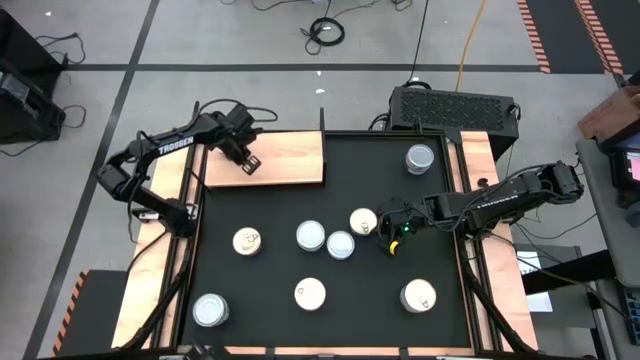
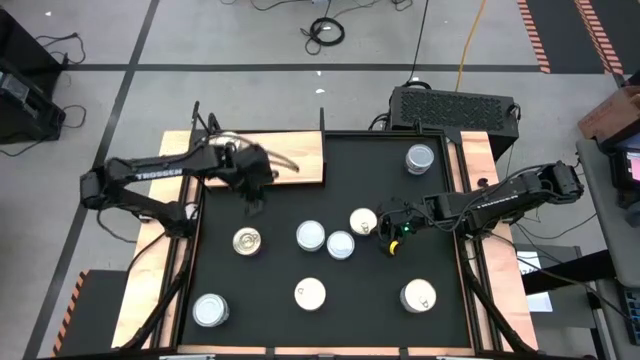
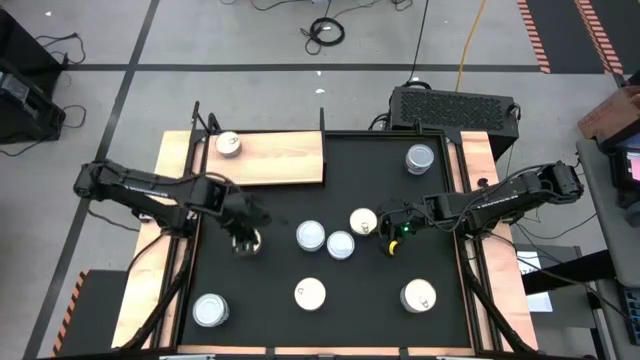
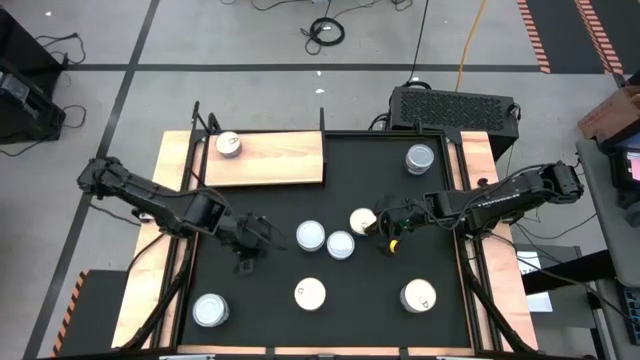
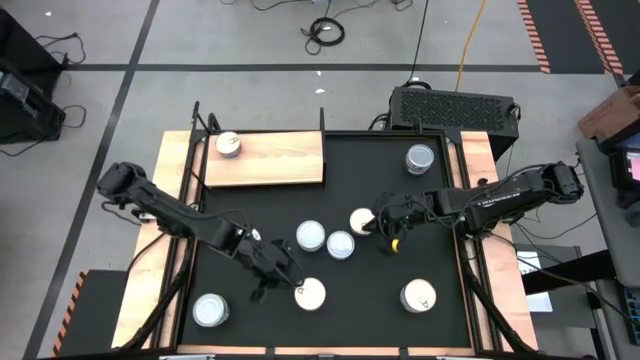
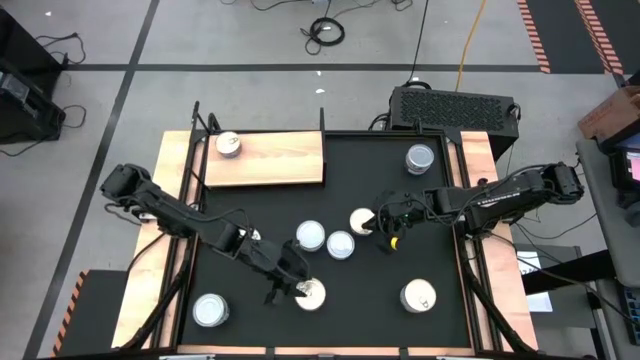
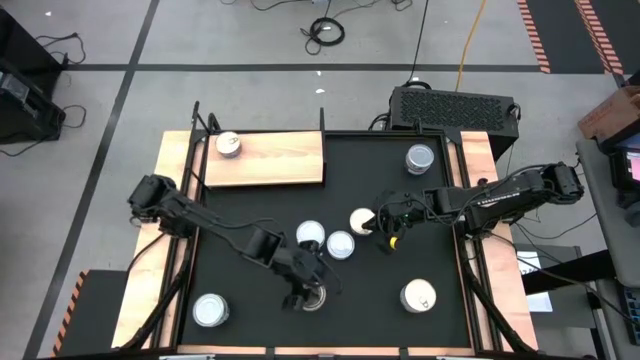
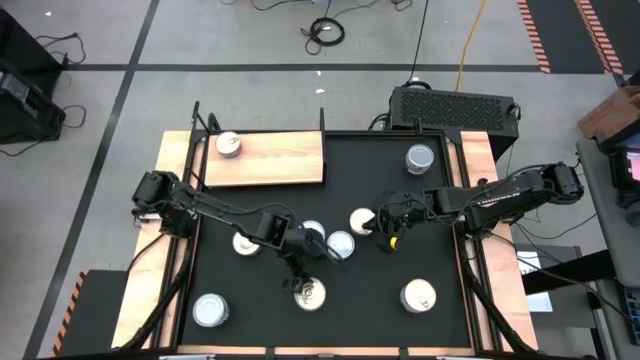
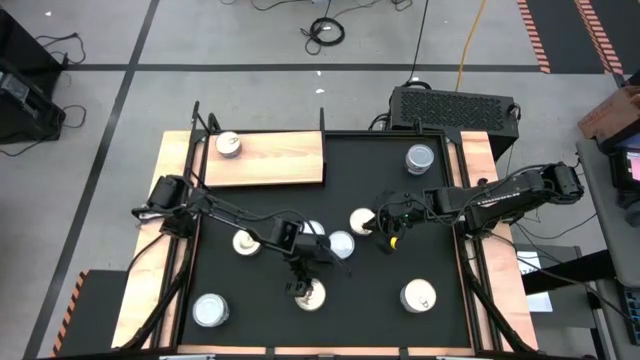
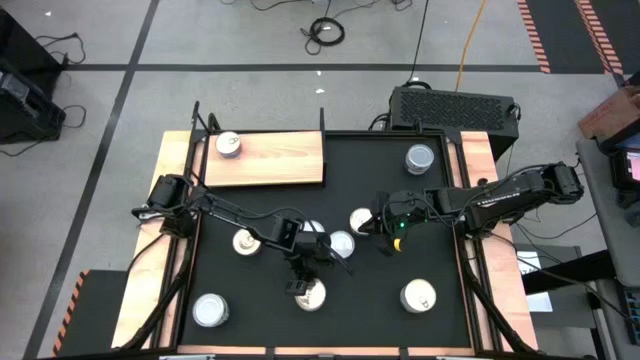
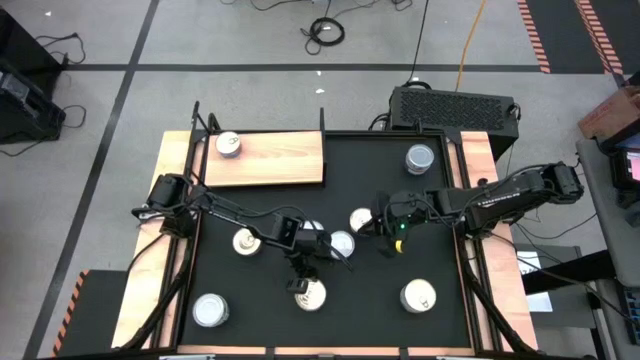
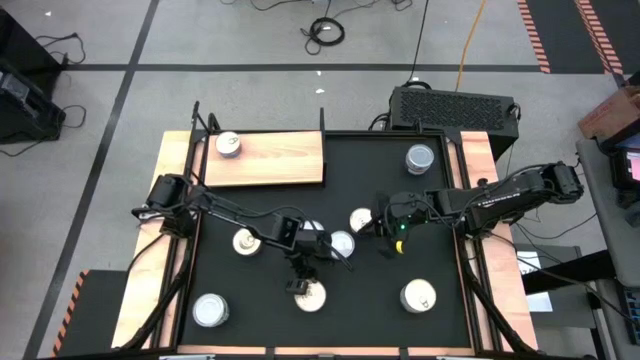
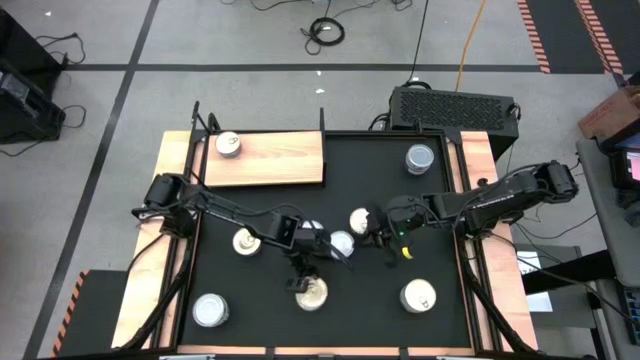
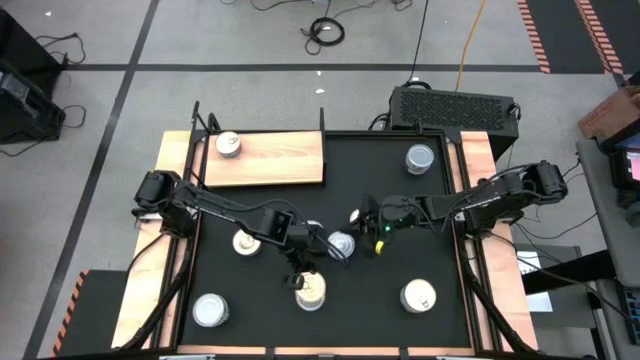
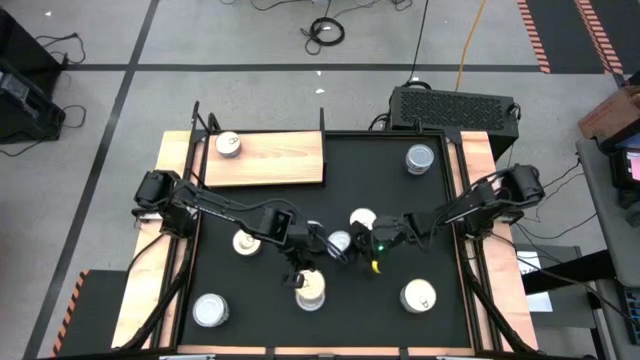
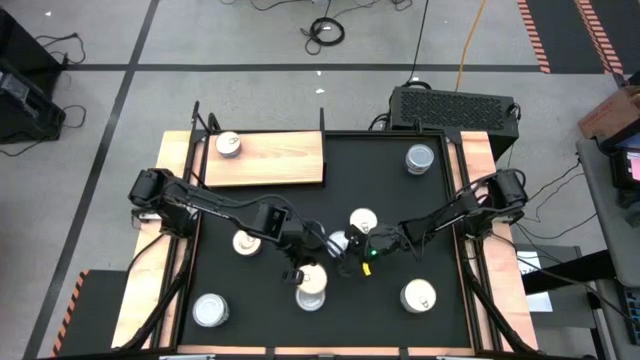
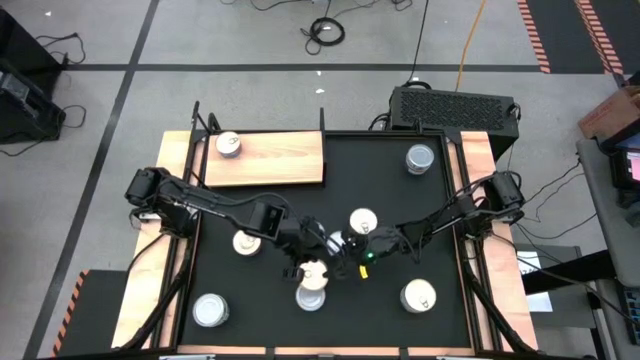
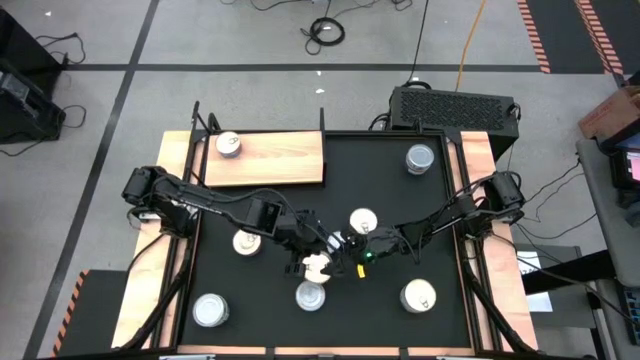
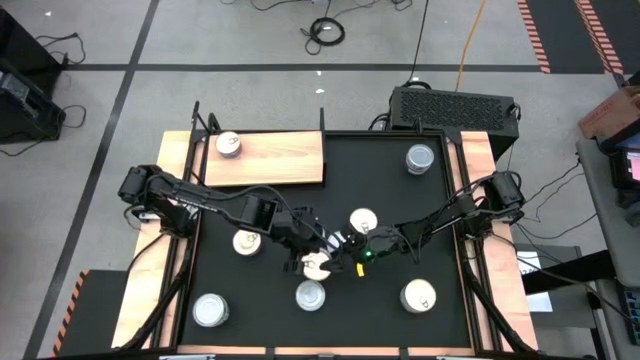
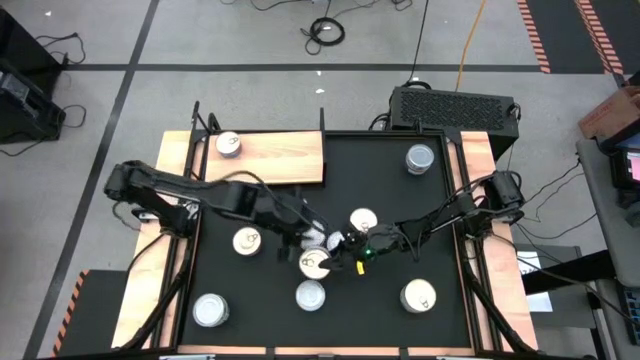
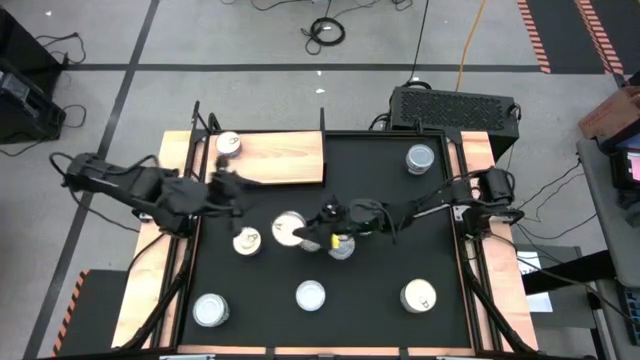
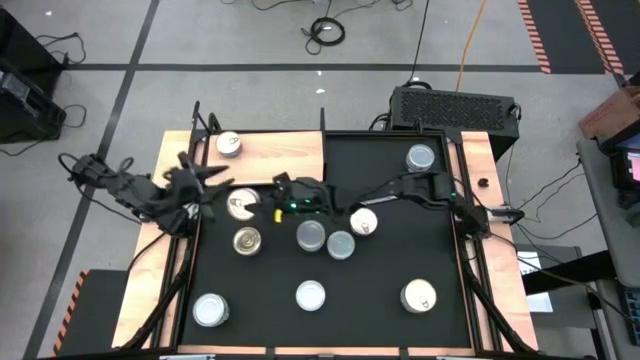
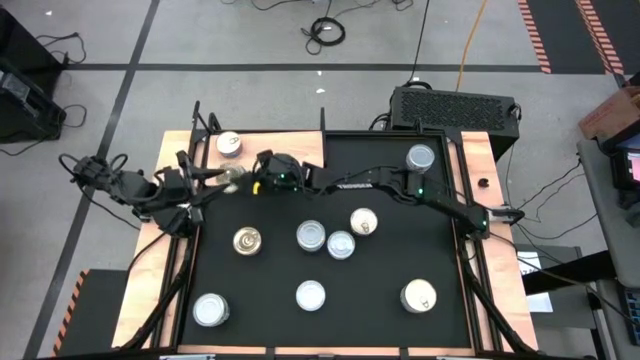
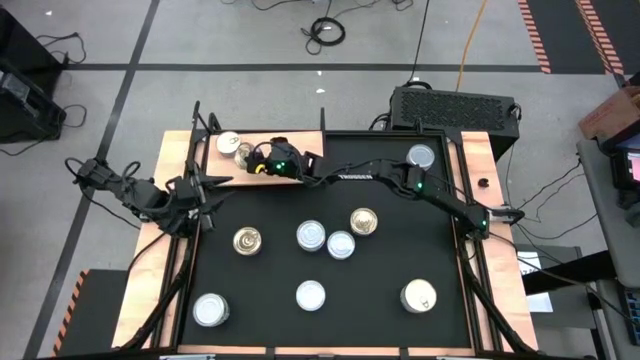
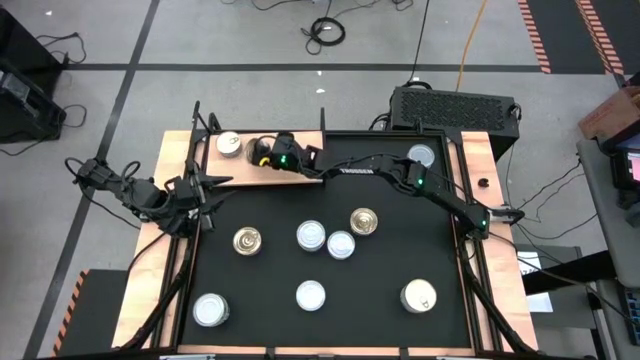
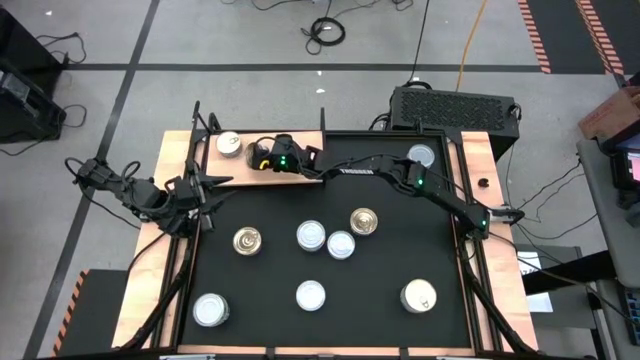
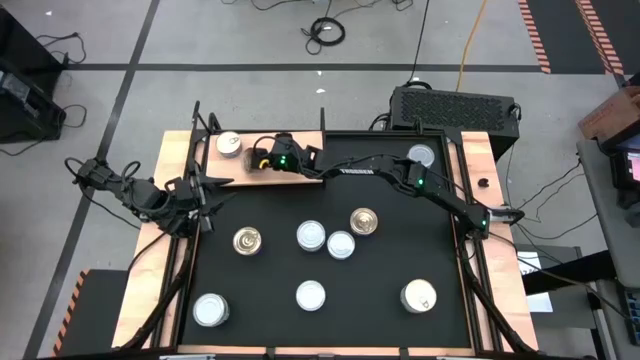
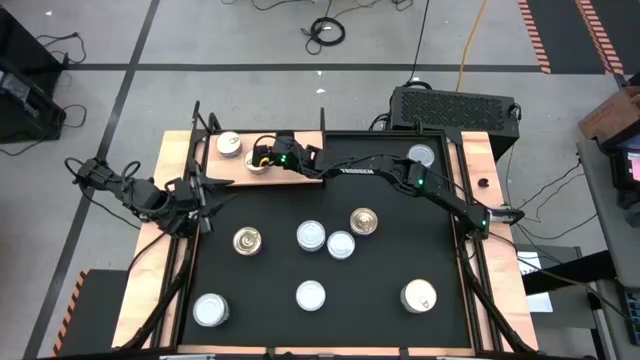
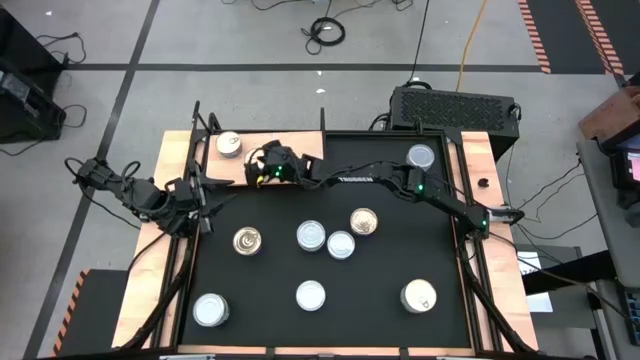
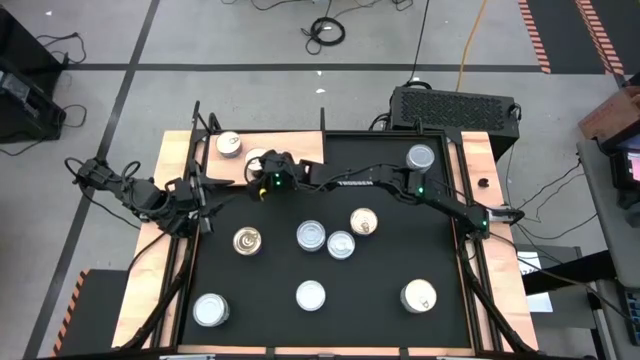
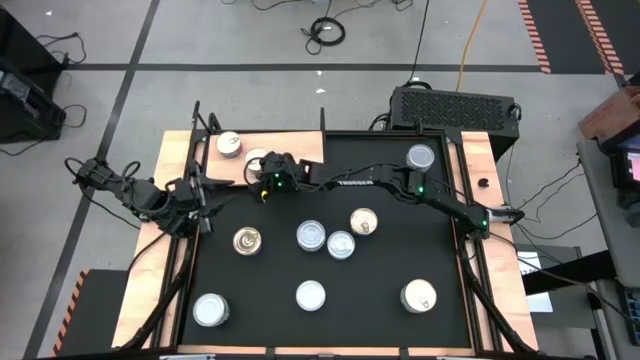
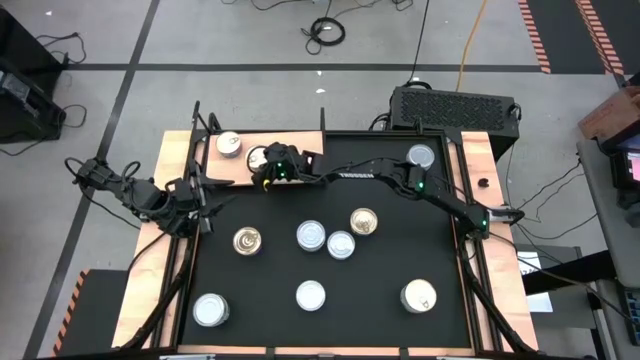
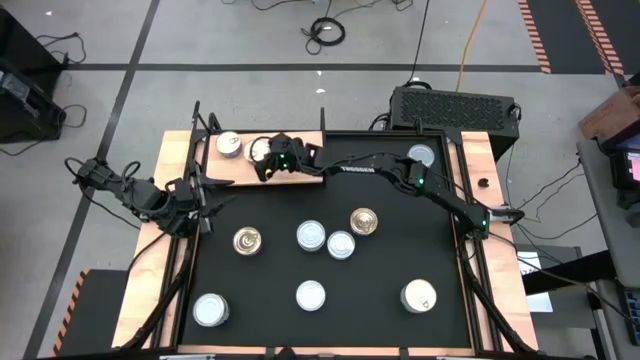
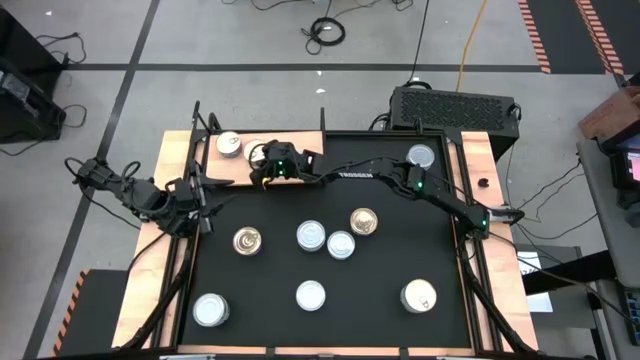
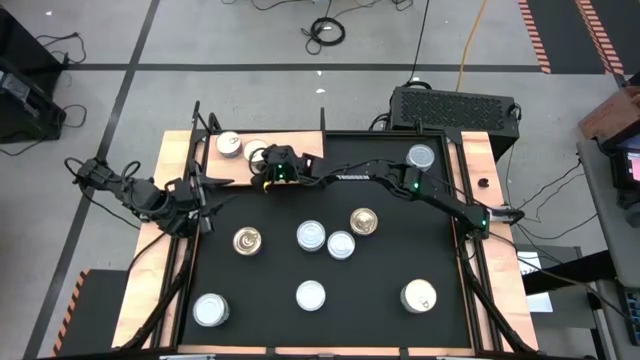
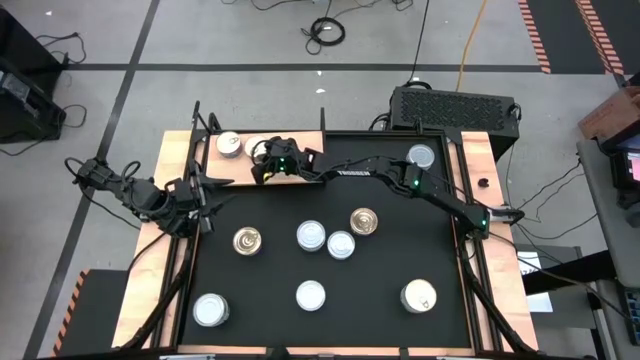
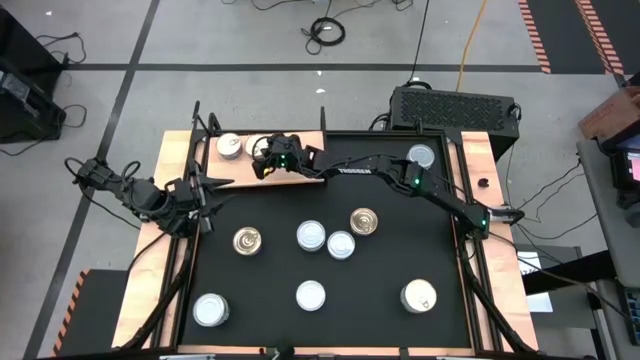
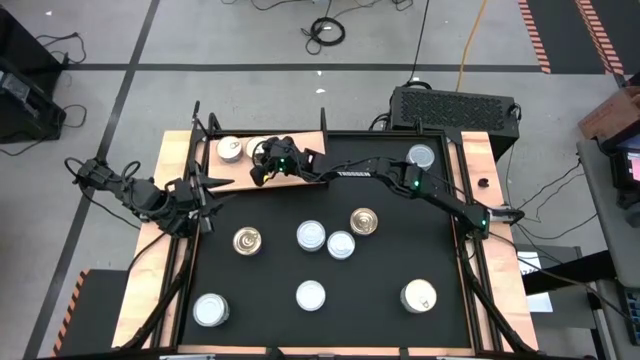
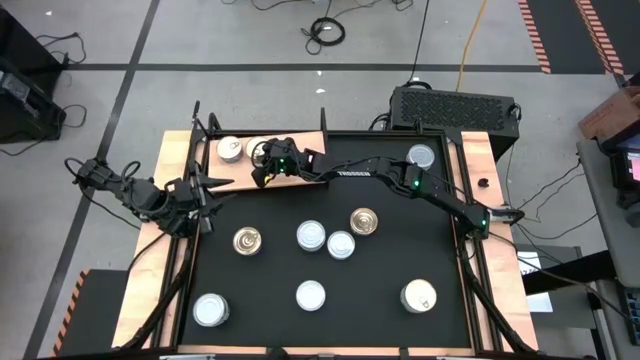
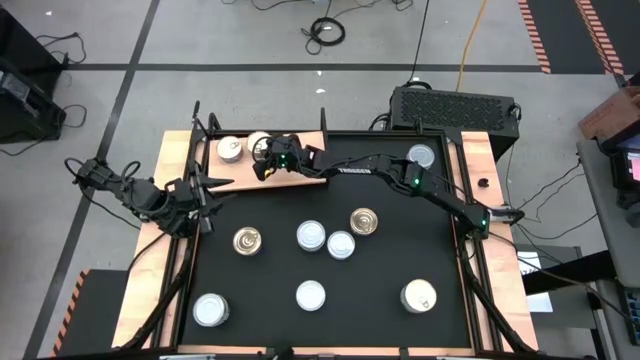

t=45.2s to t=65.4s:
Task: Stack canned seafood by type on shelf
Put the blue and pink tuna can on the shelf

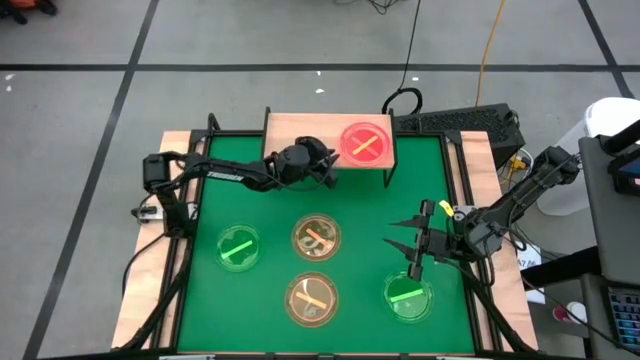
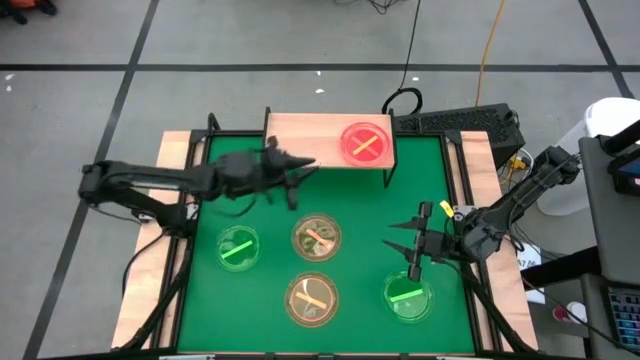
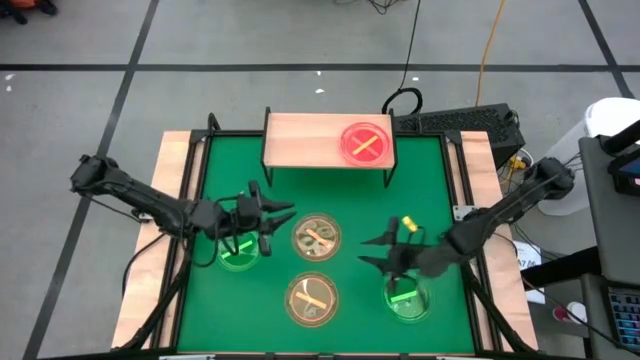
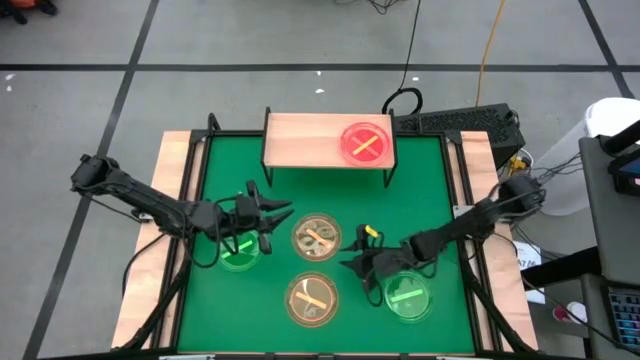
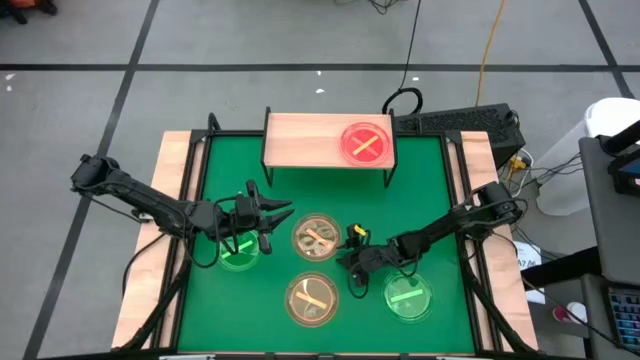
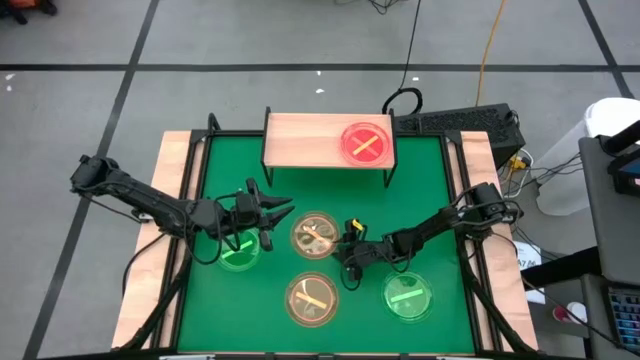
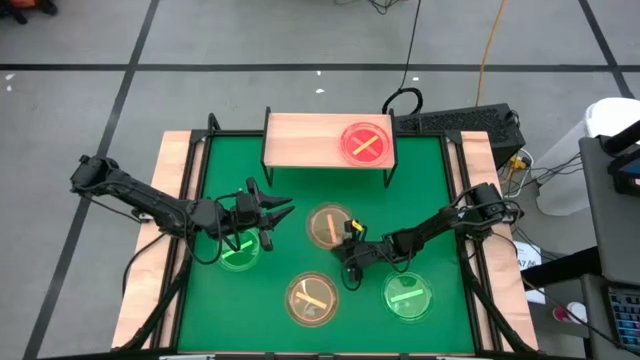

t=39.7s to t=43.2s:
Task: Place and stack plates onto a shelf
Put the top orange plate on the shelf
